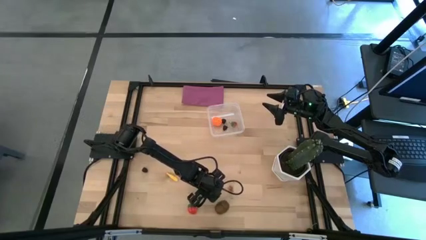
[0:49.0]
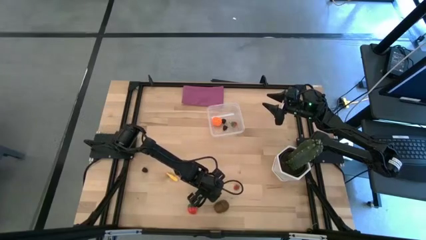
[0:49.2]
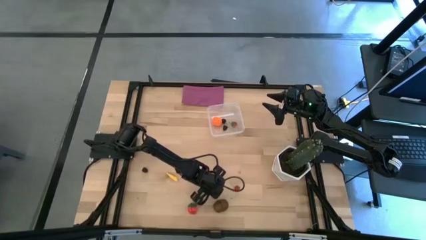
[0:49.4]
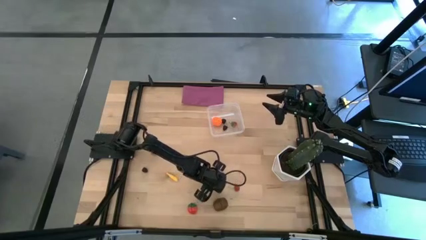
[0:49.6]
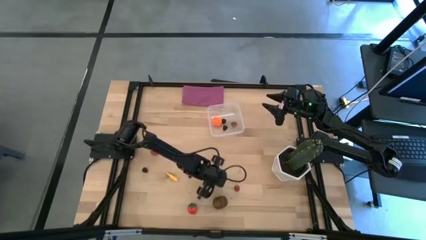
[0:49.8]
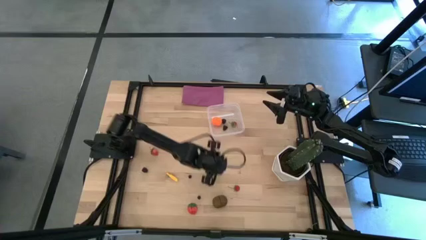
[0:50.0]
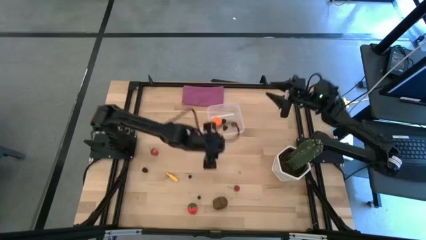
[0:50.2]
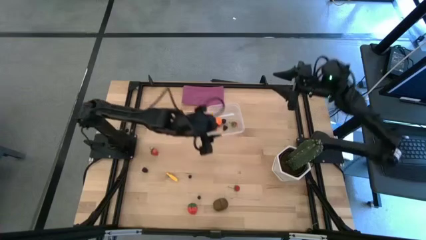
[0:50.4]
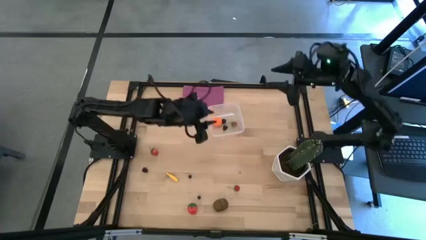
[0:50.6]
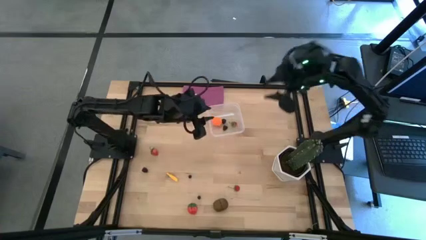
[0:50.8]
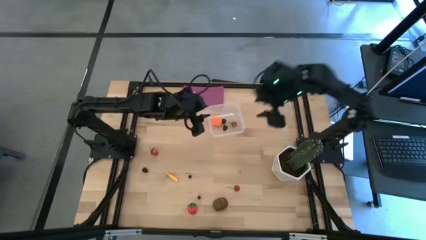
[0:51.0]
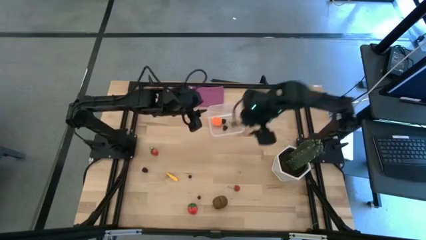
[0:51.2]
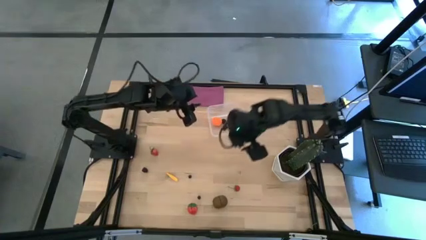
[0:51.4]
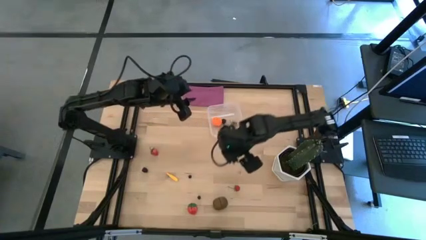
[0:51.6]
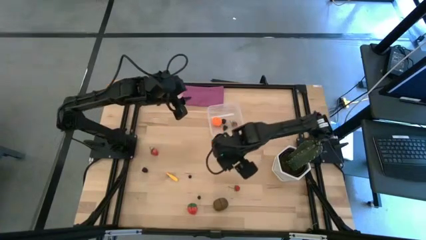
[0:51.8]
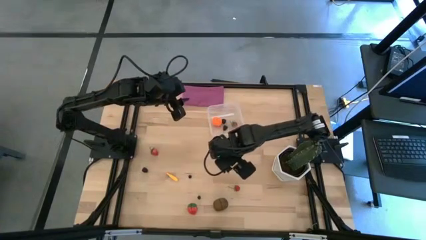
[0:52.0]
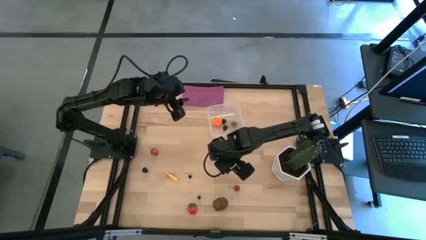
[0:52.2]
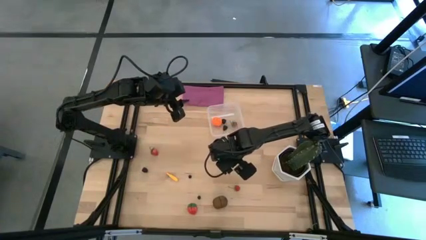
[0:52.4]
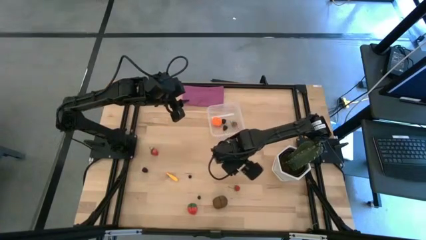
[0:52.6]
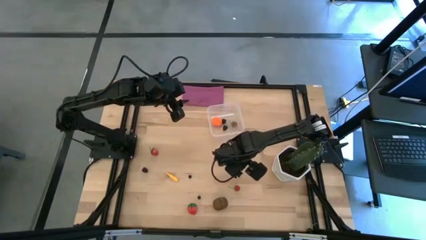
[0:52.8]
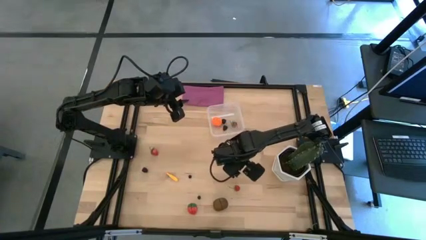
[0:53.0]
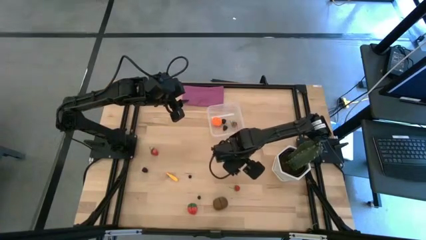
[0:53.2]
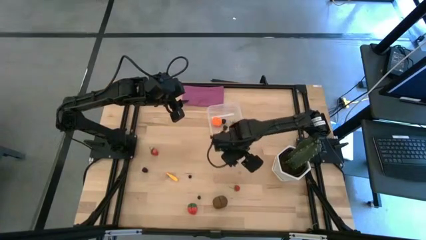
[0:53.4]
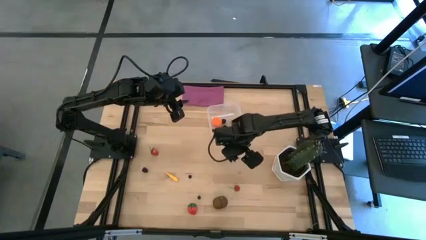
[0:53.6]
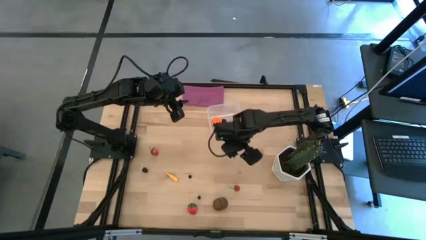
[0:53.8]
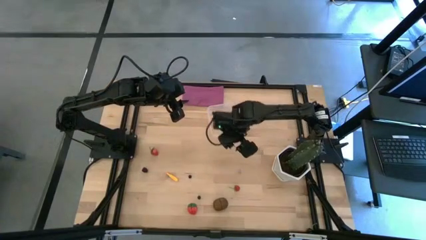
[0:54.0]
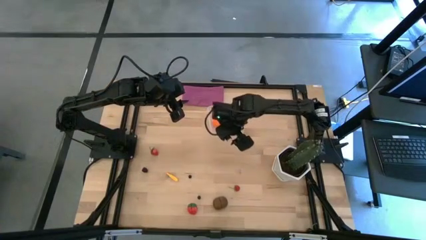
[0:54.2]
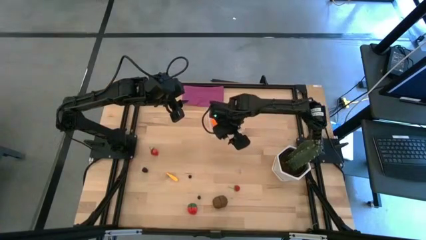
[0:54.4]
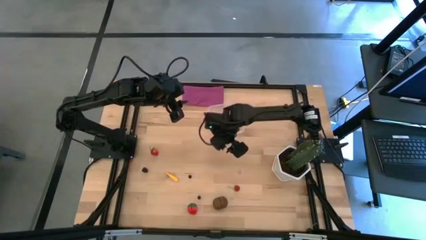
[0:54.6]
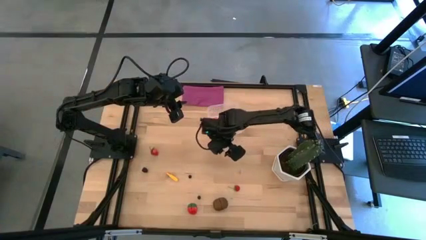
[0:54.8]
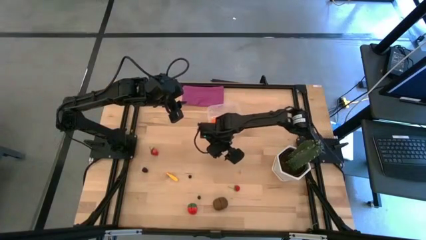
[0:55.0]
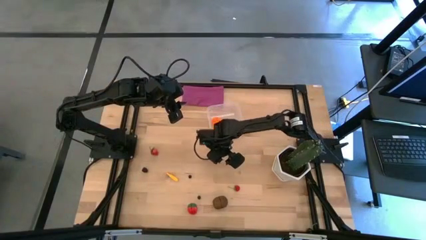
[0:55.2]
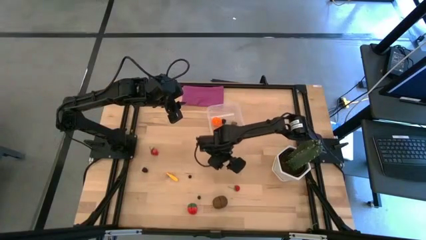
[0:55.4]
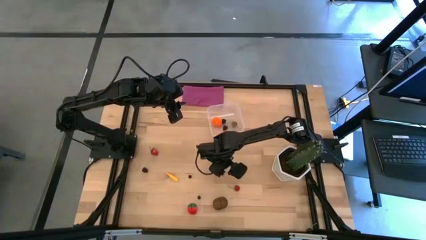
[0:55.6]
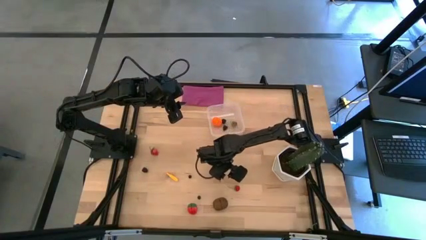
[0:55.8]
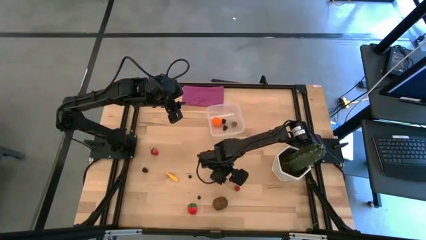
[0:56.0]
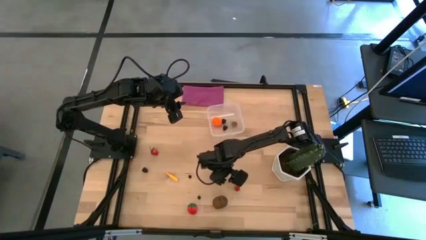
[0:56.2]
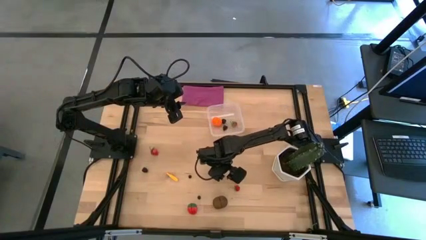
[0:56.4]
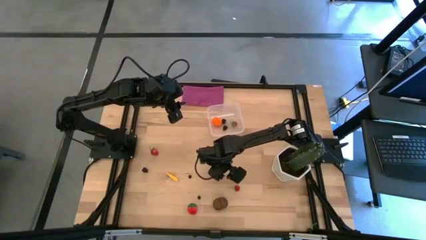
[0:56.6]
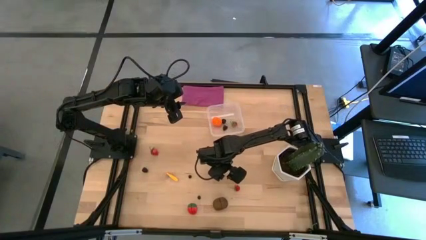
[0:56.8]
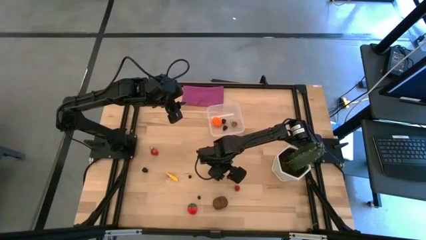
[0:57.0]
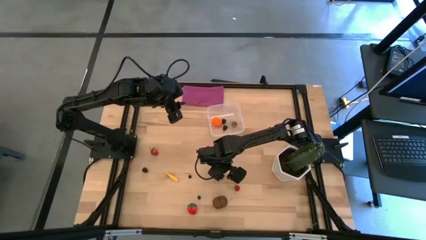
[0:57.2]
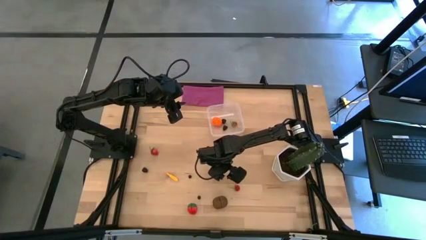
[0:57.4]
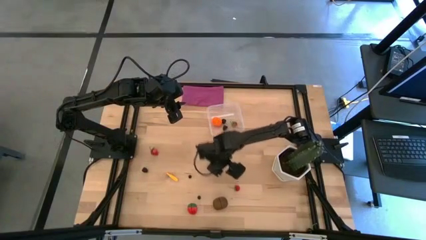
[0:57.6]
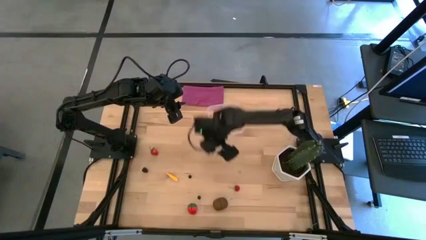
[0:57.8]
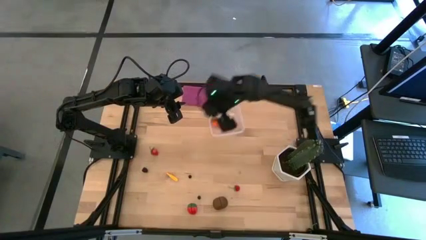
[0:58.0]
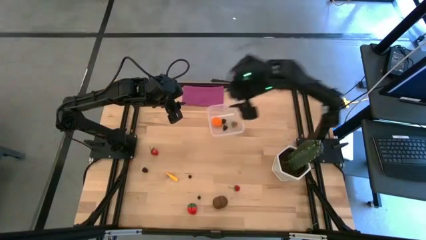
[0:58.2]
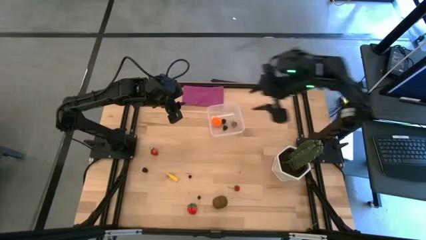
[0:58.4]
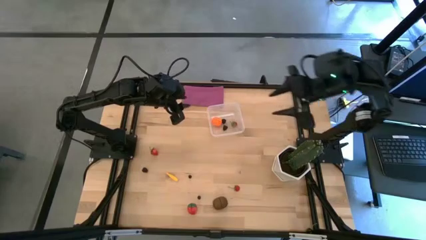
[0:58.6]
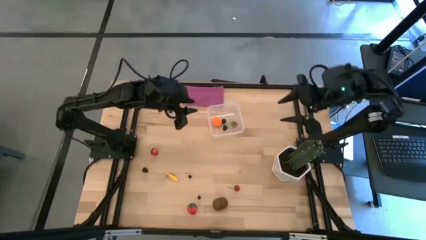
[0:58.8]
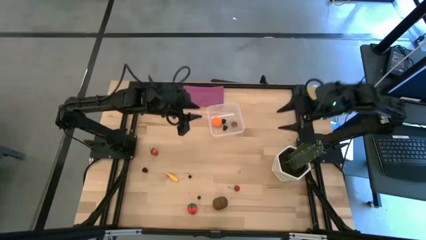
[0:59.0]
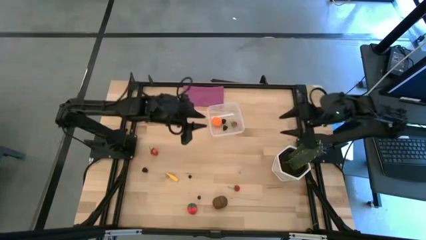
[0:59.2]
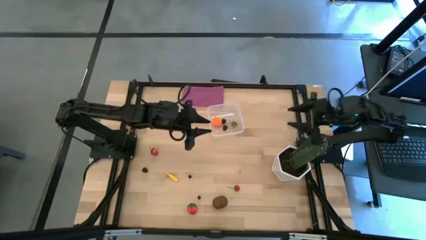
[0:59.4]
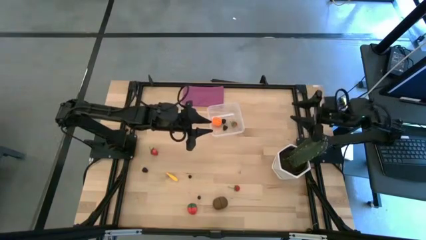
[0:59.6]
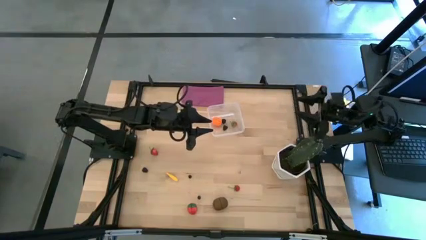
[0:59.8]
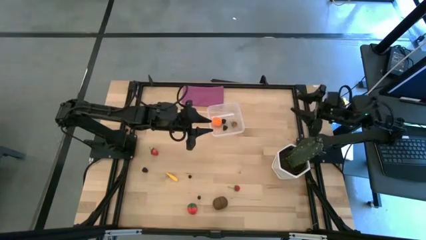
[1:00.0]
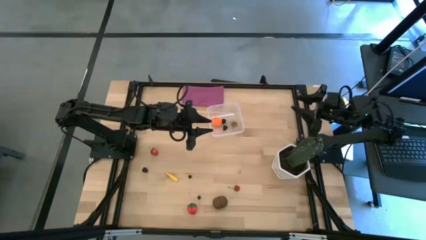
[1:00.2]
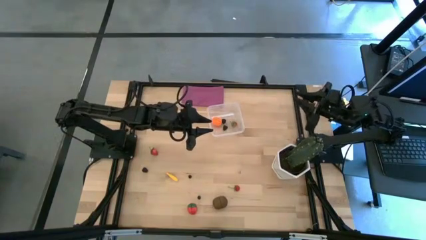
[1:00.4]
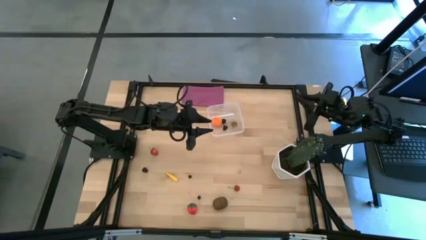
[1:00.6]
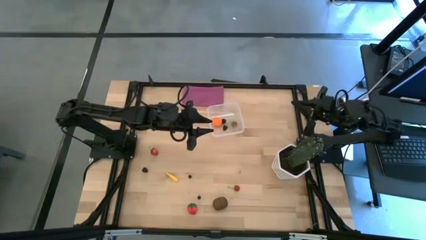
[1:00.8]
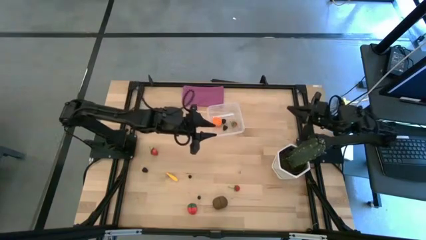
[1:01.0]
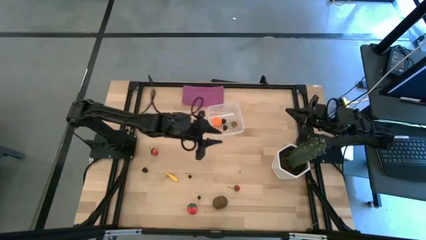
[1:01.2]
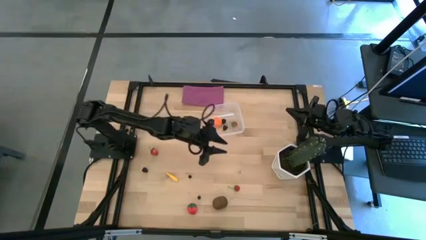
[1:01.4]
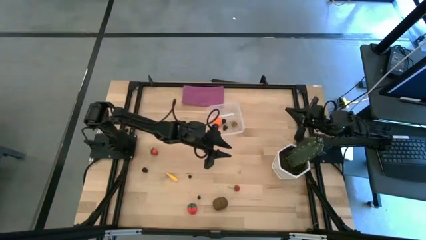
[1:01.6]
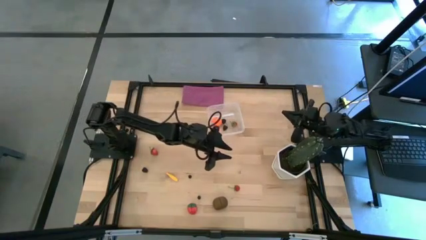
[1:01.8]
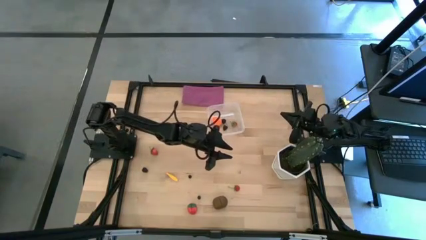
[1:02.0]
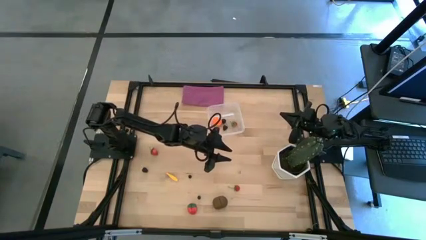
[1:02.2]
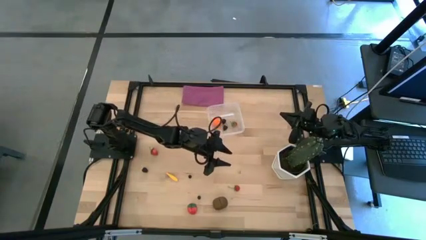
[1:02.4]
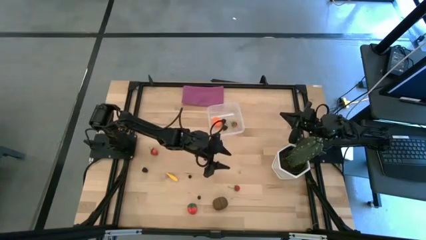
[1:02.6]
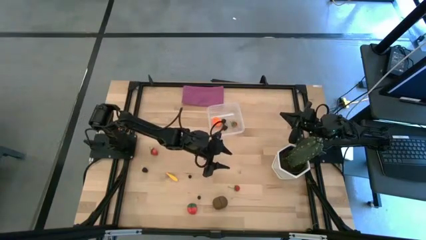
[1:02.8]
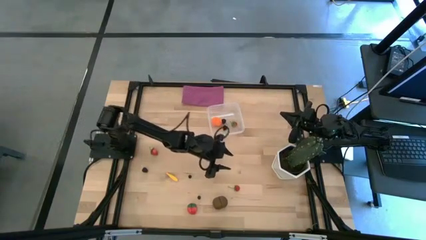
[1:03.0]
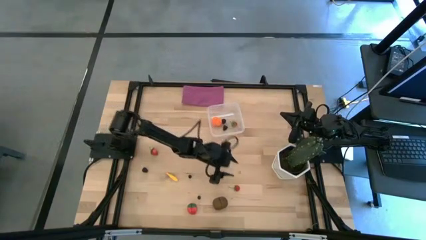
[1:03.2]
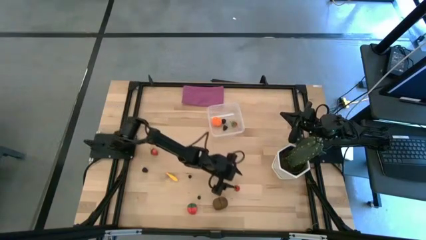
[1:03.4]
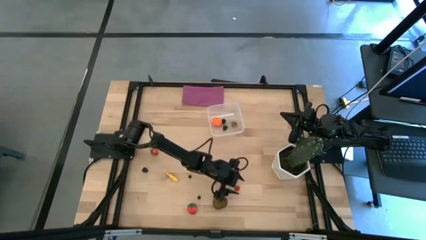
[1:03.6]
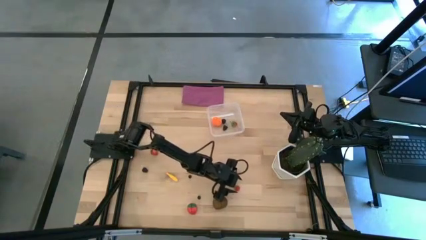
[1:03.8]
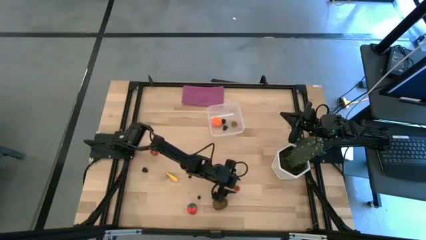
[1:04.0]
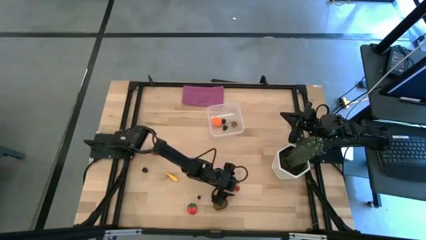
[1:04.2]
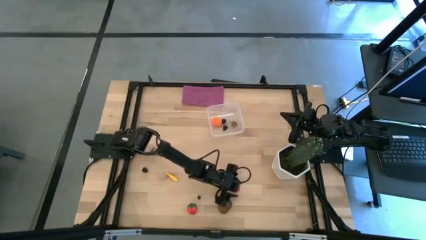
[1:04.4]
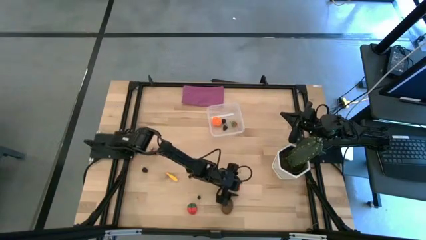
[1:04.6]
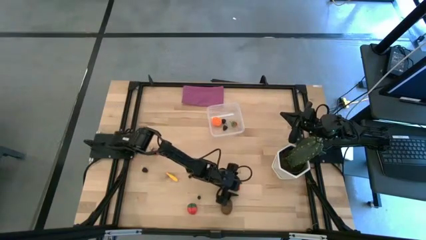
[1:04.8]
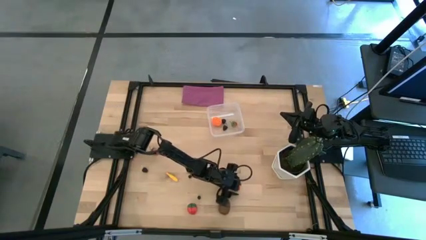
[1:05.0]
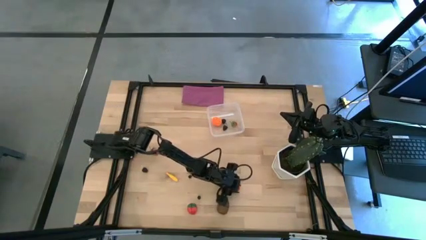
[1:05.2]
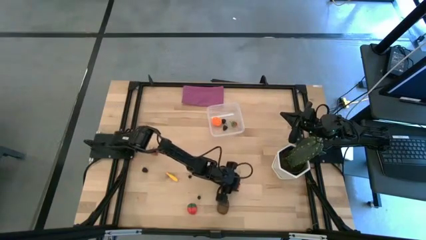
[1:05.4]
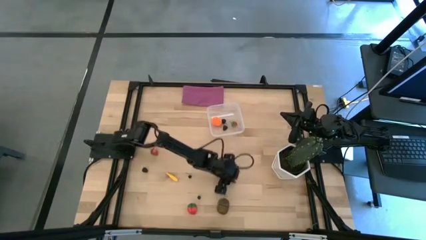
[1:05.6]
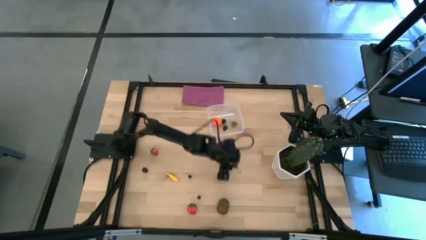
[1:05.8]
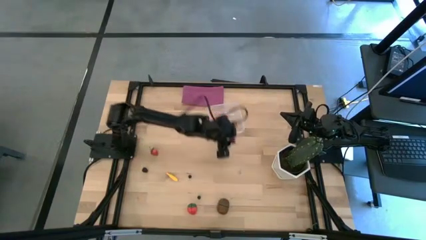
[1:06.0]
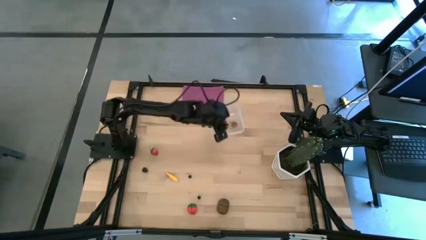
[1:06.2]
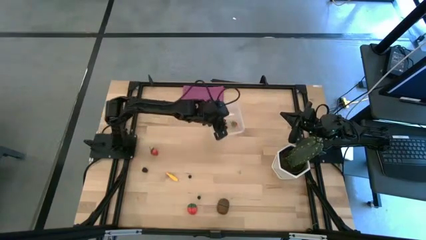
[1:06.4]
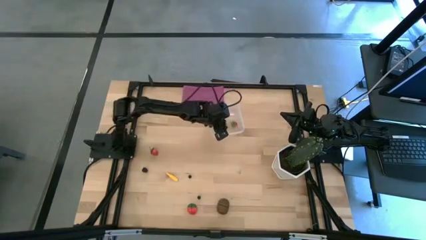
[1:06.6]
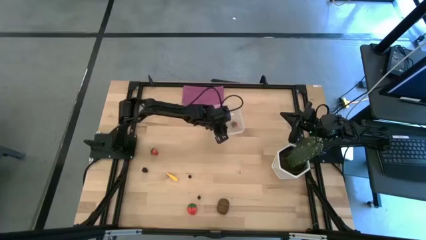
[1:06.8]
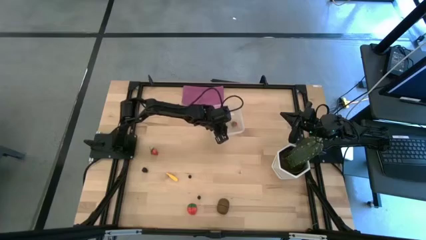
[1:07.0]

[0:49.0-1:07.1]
Task: Pick and placing Produce into tupperware
Put the middle red strawberry into the transparent bin
